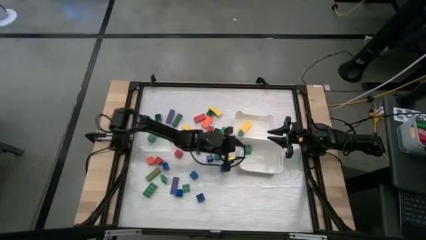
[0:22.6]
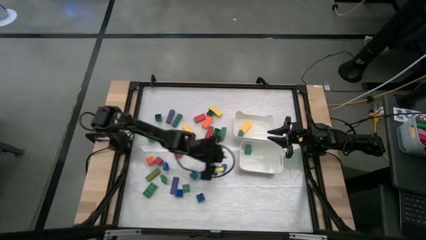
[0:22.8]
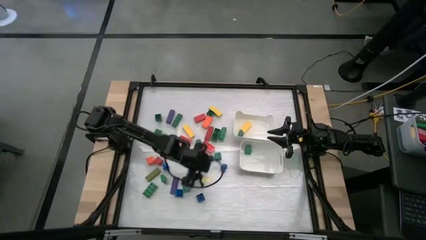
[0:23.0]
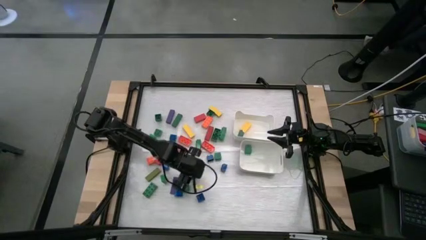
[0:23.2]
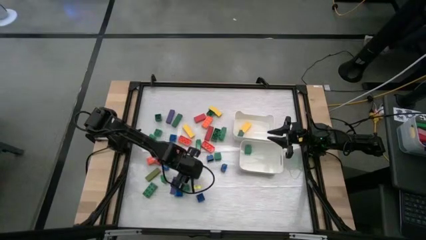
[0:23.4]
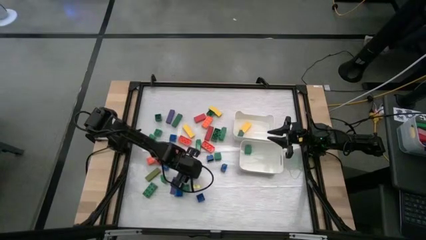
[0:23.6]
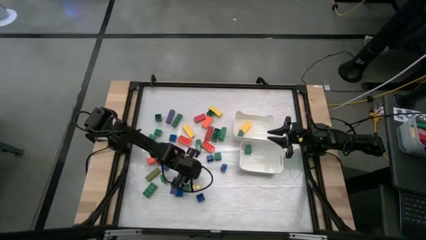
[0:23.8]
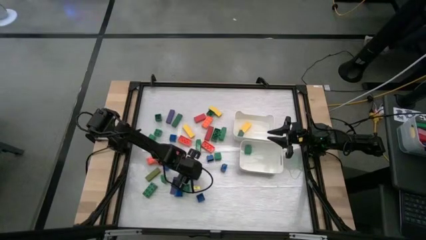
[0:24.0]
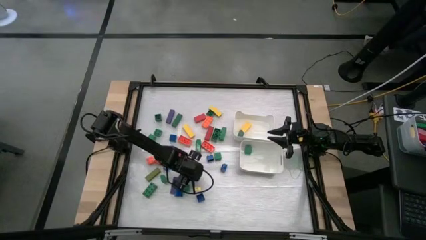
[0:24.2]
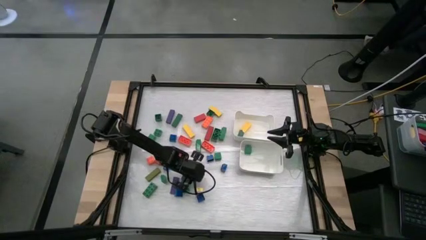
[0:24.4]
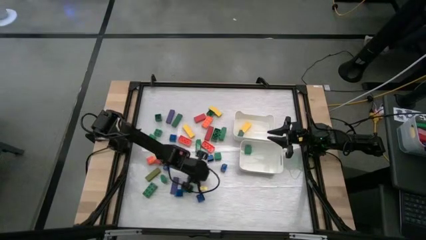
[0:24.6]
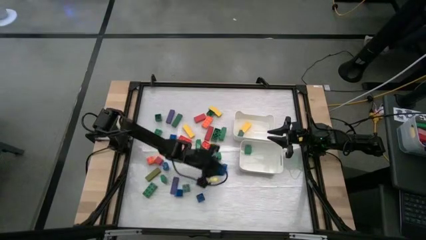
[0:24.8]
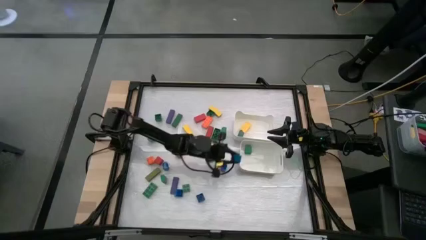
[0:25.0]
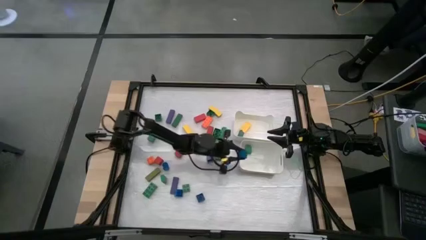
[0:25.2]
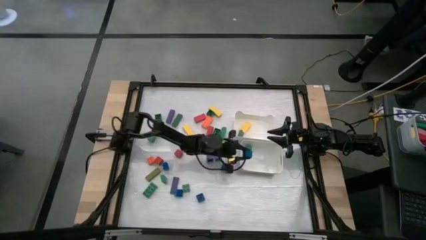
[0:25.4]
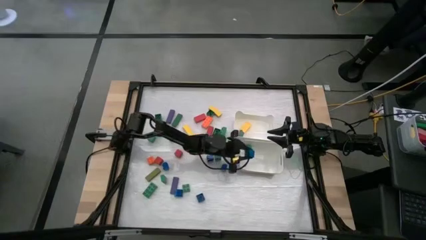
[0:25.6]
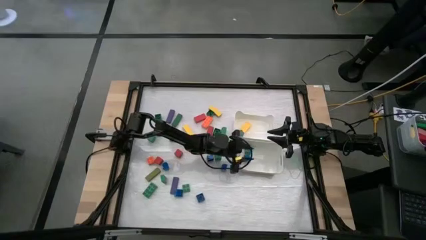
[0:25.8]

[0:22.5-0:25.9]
Task: Sort blocks by size
Put the blue cube block into the bottom white bin

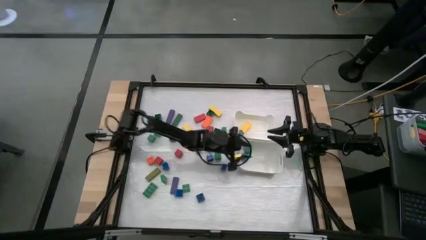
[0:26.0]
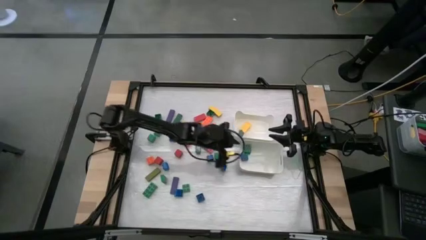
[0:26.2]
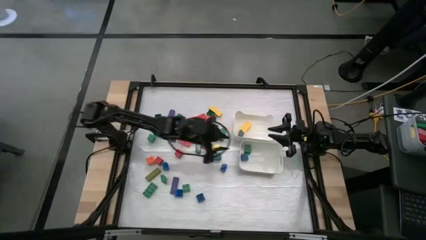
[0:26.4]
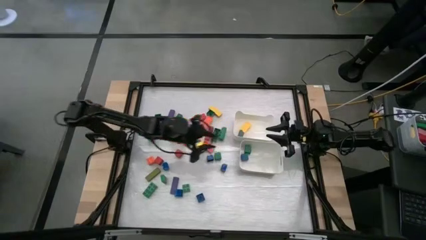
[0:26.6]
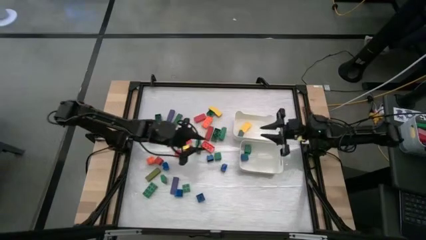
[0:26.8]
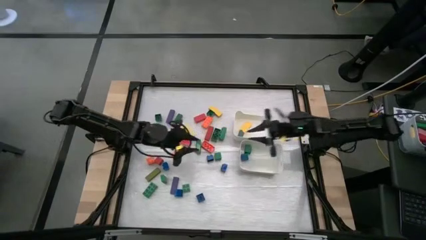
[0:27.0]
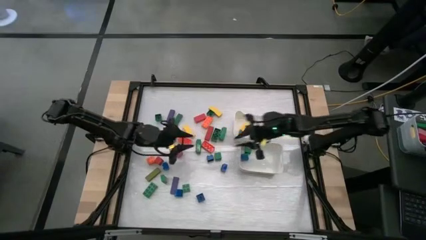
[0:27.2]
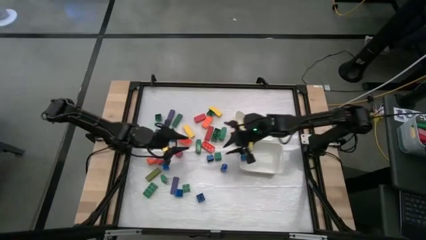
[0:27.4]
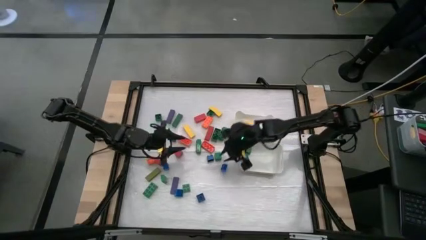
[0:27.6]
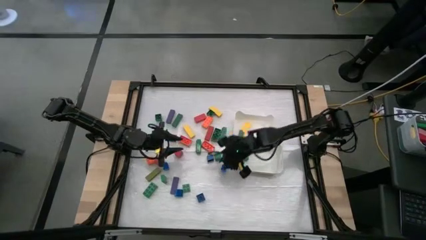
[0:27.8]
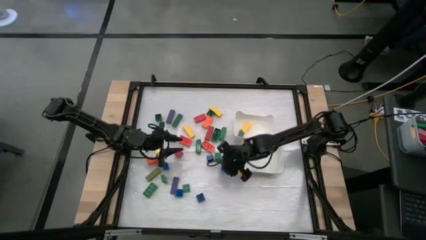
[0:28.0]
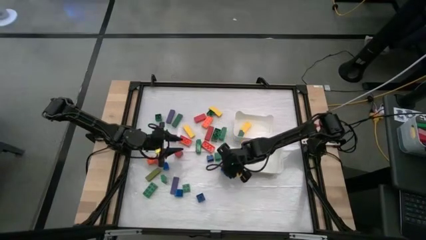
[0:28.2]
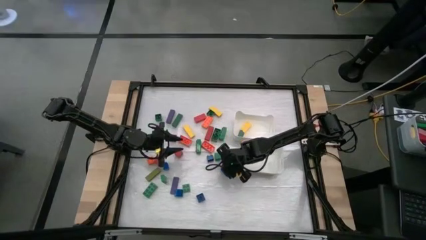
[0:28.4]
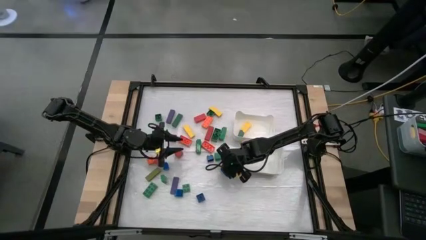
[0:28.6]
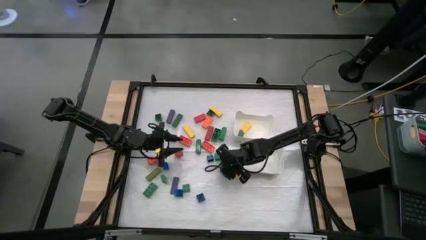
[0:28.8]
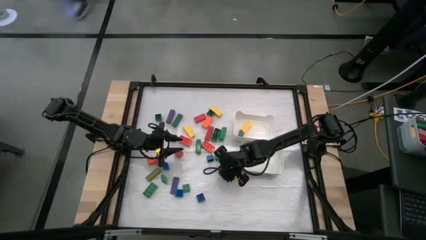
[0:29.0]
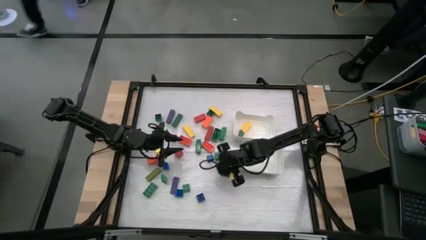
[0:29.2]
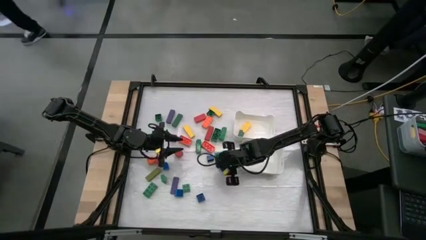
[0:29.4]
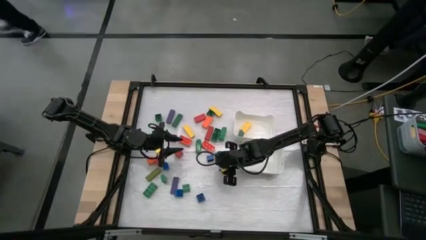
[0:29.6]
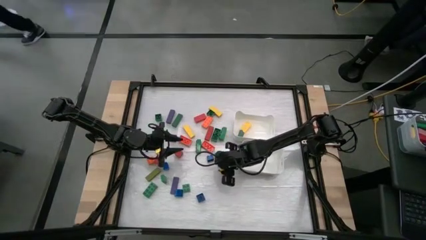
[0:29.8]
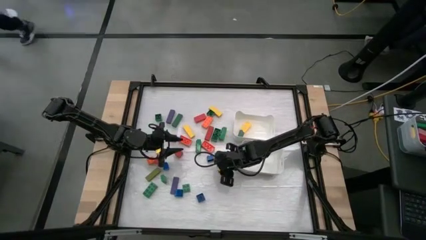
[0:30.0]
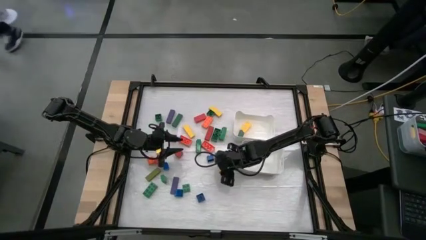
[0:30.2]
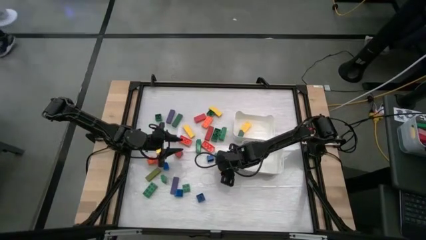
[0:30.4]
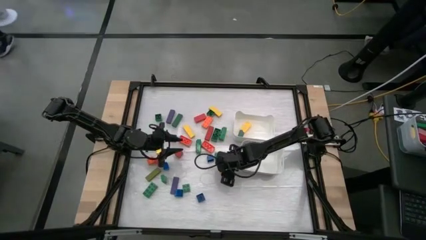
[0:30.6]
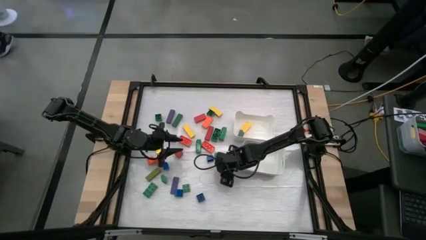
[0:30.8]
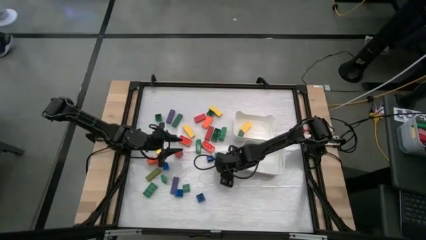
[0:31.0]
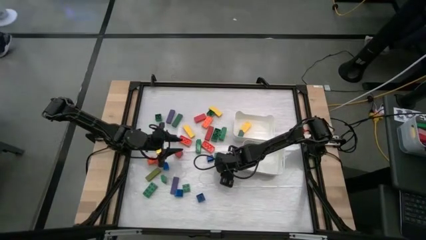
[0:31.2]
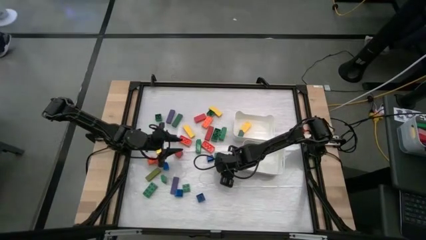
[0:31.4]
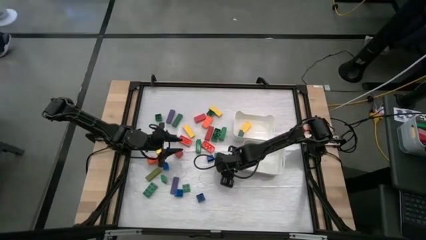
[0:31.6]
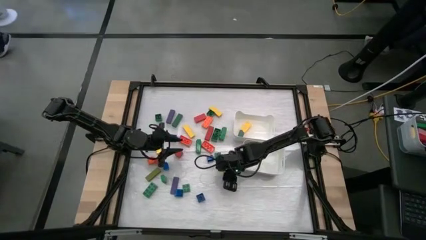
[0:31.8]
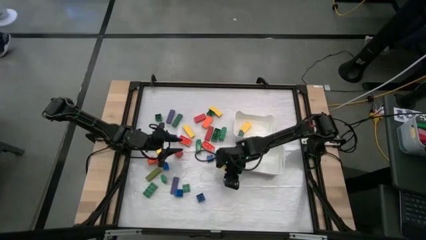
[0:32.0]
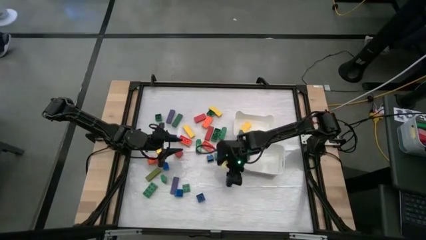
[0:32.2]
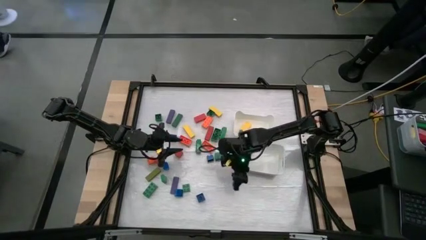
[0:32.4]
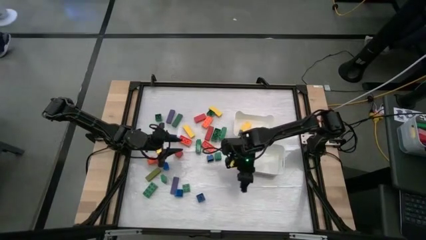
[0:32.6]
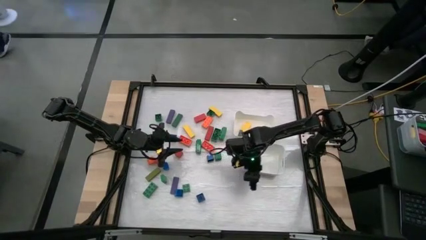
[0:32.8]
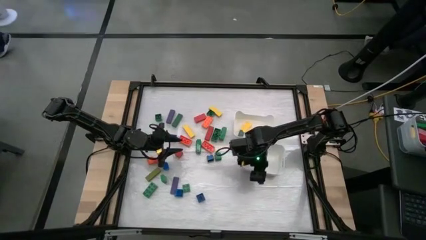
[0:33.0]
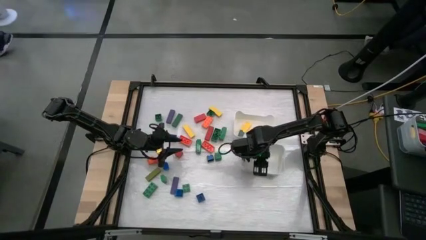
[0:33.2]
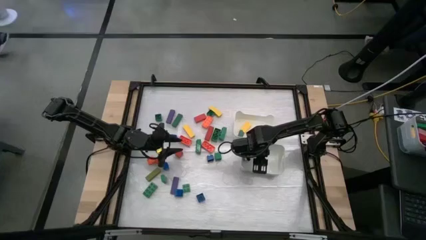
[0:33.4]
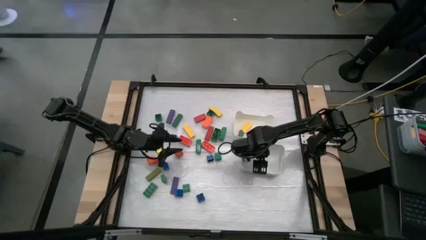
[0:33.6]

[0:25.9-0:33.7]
Put the blue cube game piece into the bottom white bin

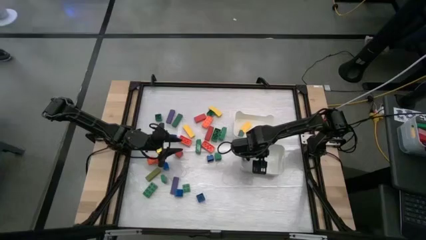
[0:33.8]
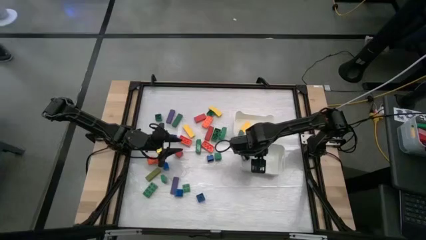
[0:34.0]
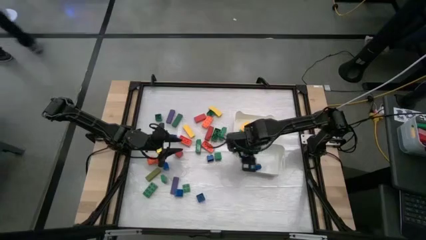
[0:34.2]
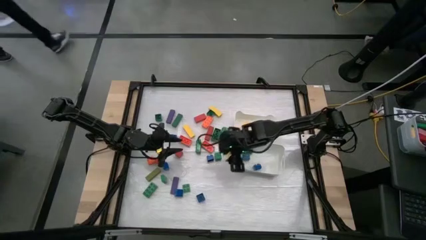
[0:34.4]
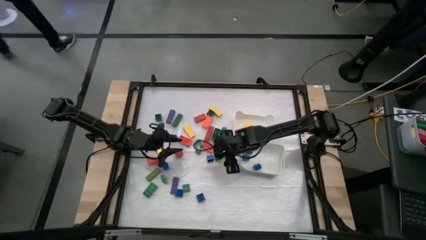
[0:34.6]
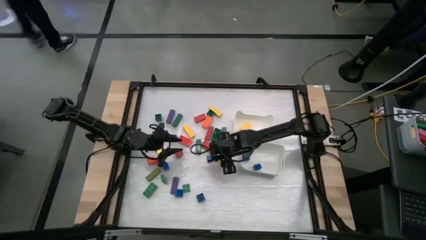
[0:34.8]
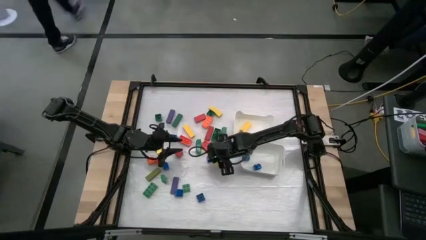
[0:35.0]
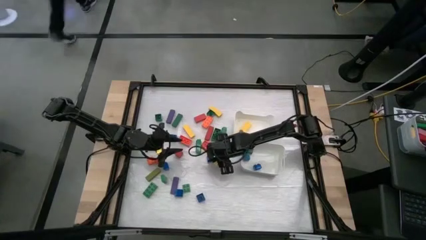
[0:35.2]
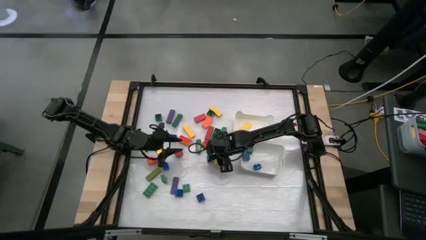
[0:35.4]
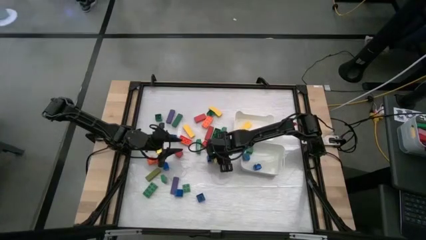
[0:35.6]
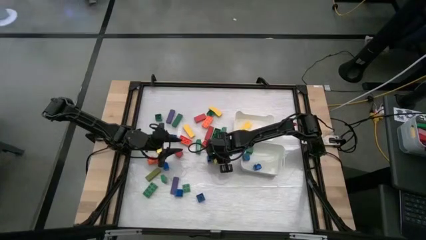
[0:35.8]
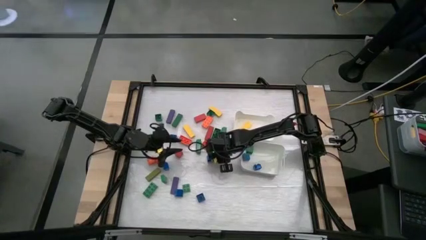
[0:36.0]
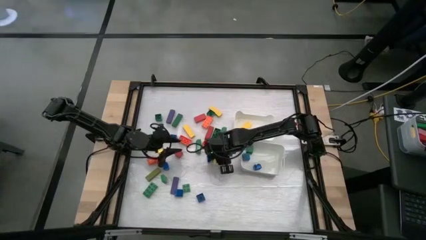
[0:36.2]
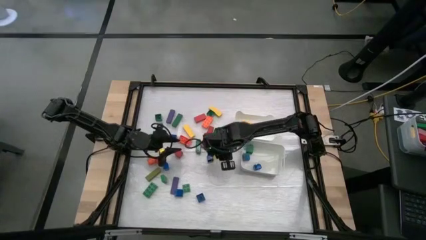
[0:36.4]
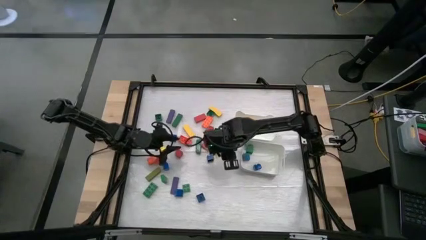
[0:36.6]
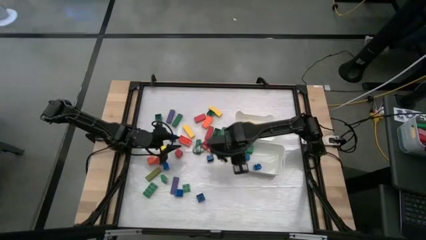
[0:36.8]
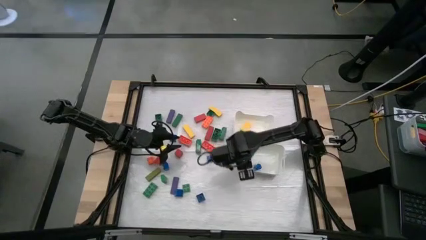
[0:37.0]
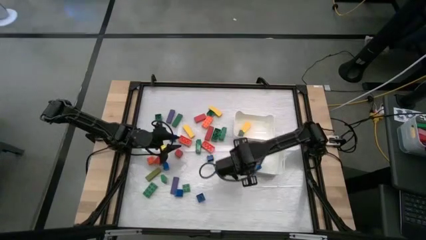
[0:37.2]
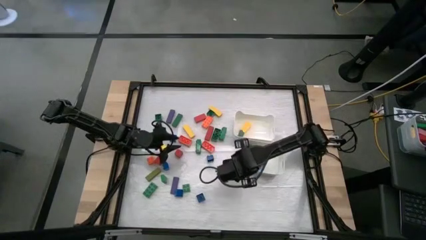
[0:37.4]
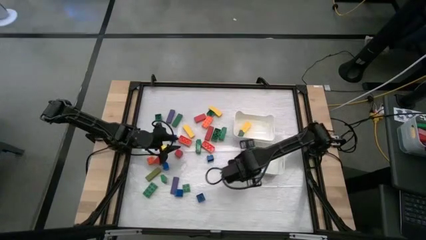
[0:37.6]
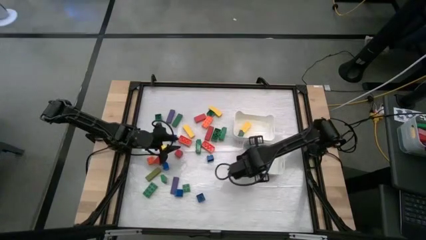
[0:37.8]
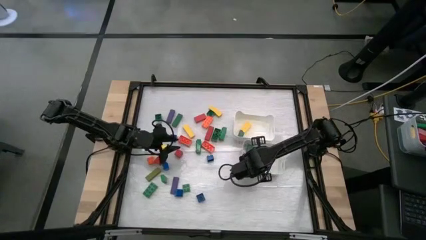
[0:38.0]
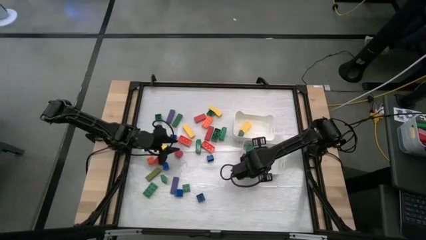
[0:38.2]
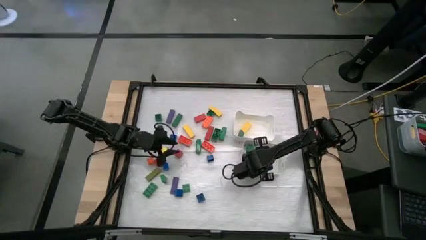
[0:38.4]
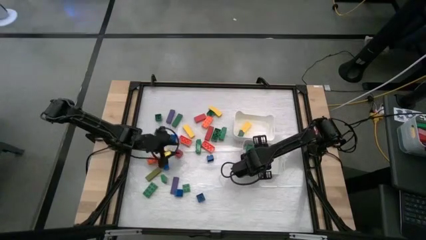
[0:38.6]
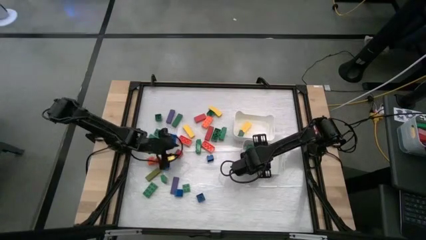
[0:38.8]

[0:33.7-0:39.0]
Put the green cube block into the bottom white bin

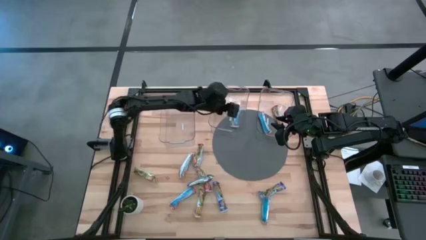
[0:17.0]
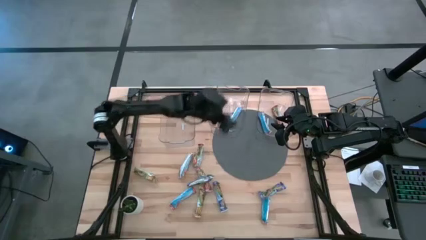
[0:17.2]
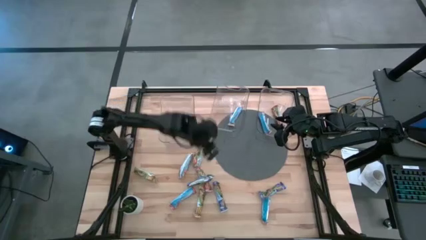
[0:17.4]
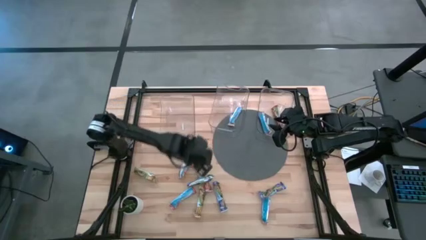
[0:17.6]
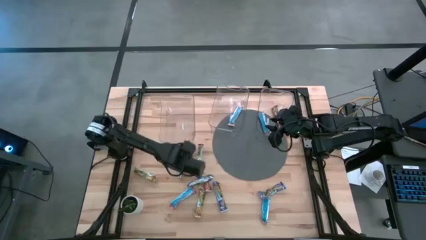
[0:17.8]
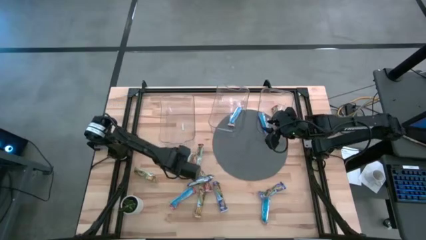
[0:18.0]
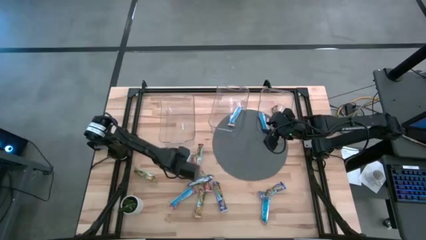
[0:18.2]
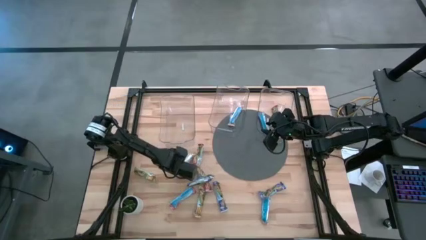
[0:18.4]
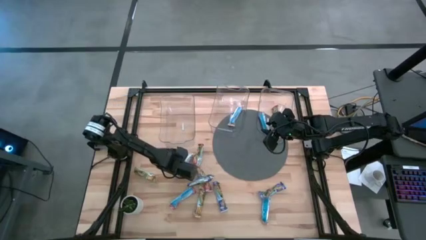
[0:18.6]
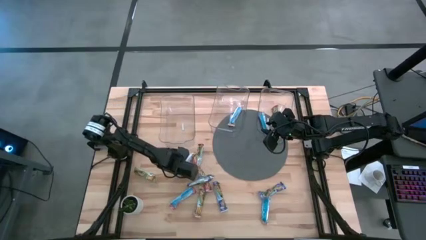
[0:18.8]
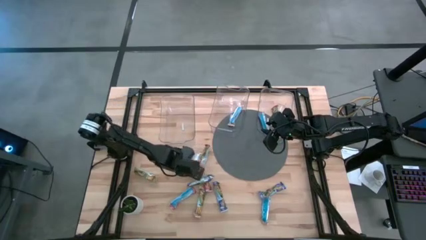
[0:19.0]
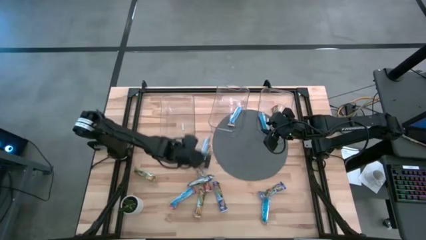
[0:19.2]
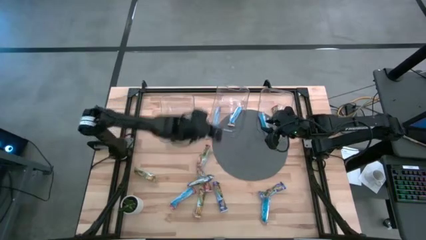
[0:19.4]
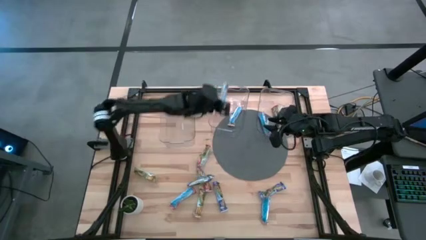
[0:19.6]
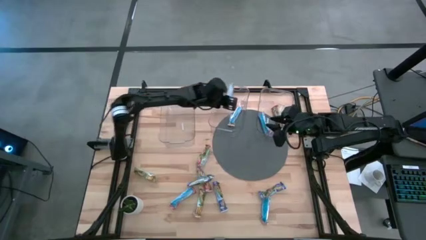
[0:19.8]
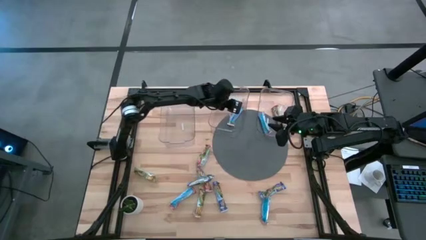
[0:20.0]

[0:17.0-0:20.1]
Task: Pick and place Granola Bars by type
Put the yellow granola bar into the middle transparent bin
